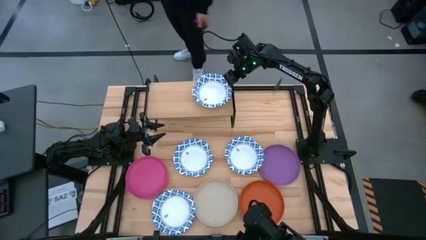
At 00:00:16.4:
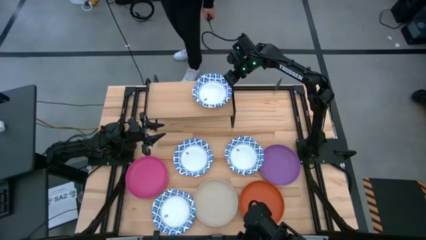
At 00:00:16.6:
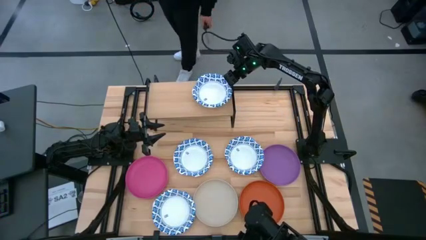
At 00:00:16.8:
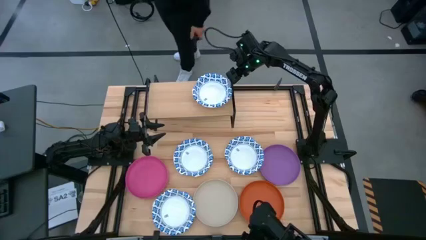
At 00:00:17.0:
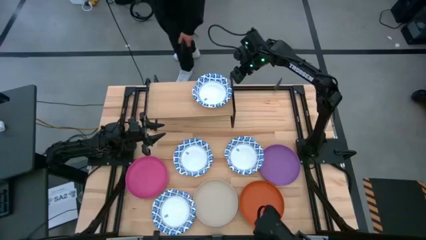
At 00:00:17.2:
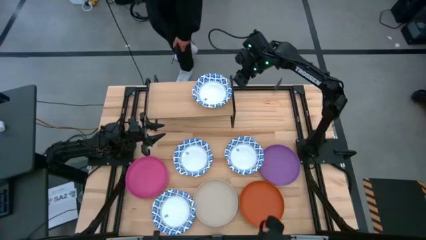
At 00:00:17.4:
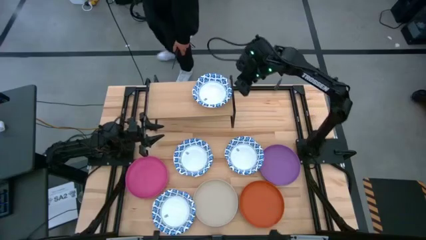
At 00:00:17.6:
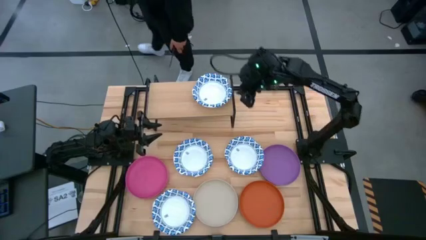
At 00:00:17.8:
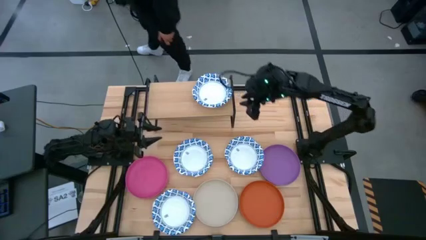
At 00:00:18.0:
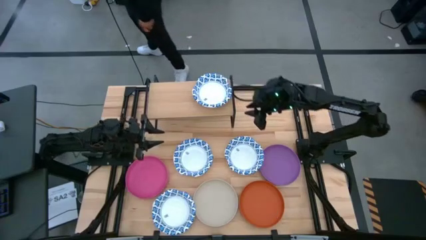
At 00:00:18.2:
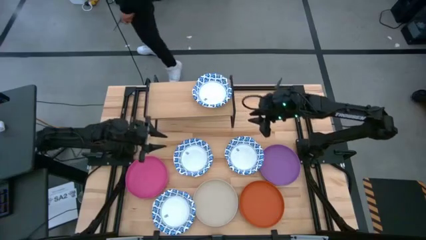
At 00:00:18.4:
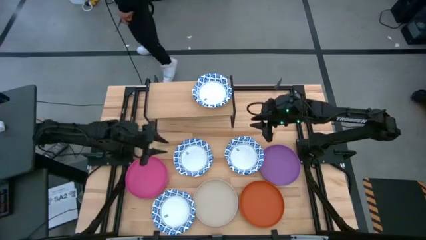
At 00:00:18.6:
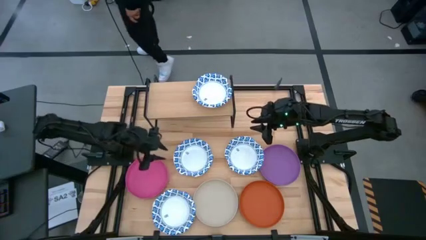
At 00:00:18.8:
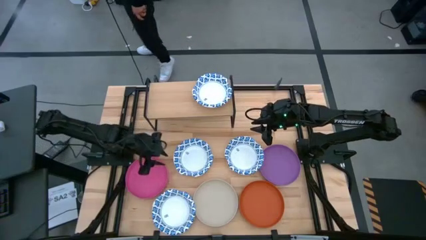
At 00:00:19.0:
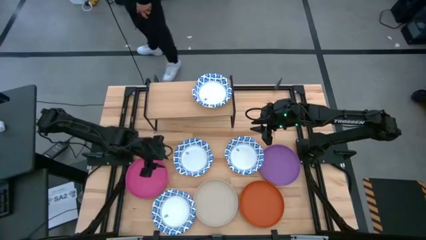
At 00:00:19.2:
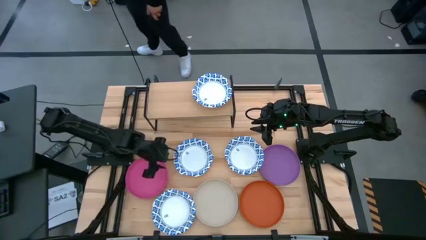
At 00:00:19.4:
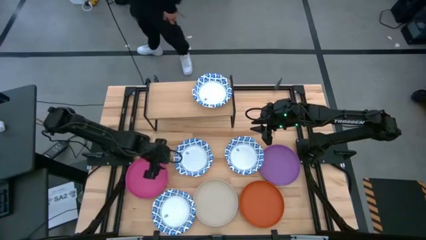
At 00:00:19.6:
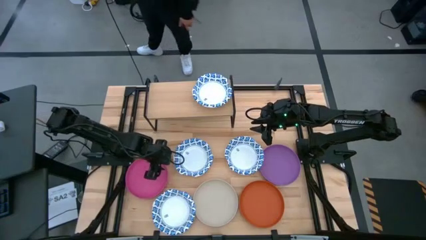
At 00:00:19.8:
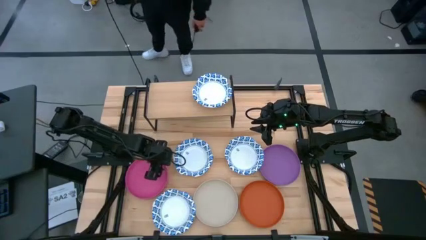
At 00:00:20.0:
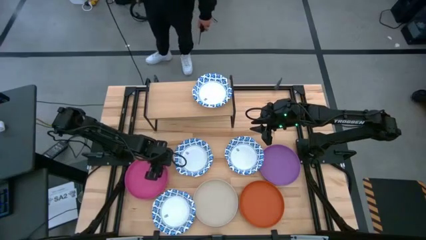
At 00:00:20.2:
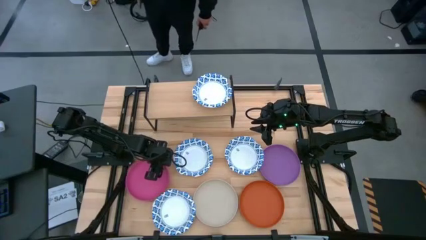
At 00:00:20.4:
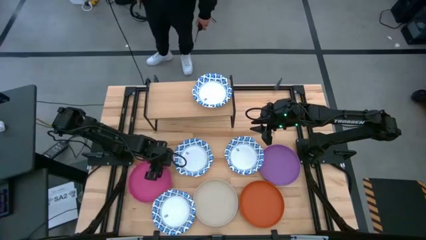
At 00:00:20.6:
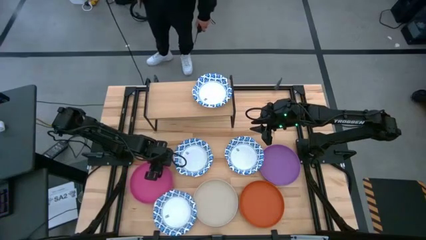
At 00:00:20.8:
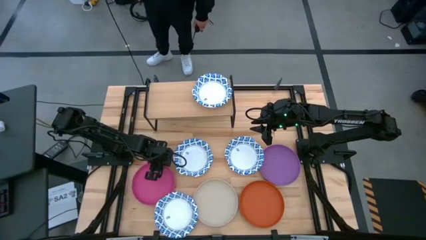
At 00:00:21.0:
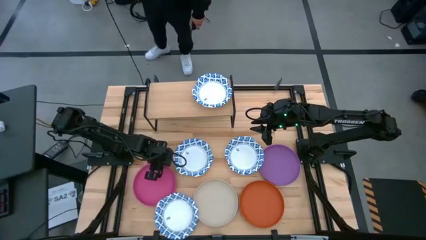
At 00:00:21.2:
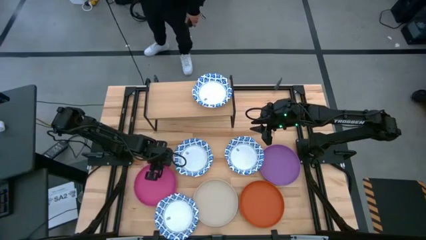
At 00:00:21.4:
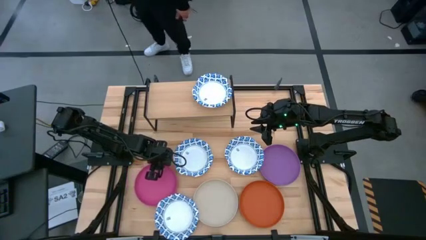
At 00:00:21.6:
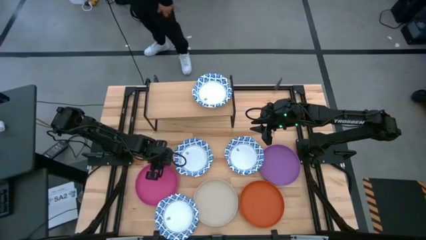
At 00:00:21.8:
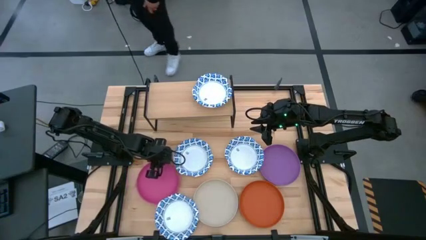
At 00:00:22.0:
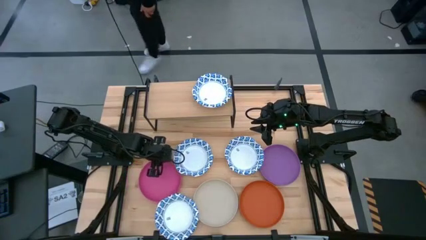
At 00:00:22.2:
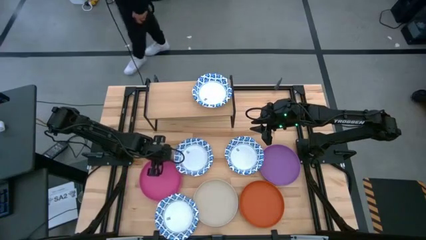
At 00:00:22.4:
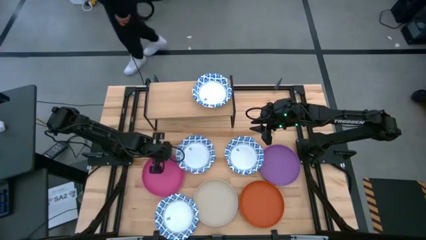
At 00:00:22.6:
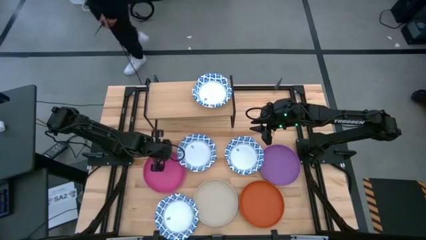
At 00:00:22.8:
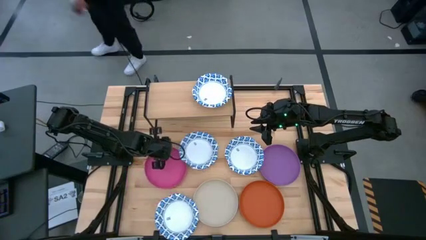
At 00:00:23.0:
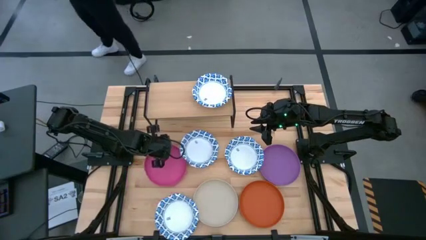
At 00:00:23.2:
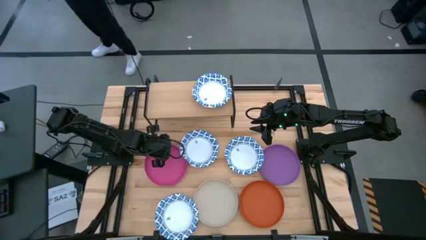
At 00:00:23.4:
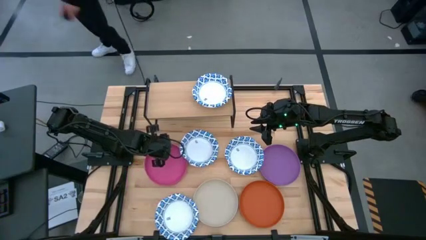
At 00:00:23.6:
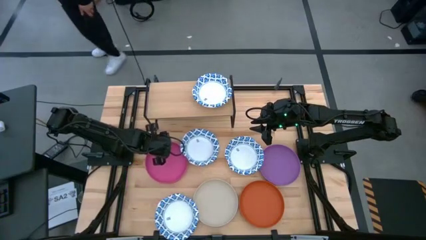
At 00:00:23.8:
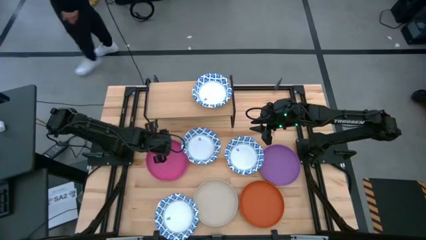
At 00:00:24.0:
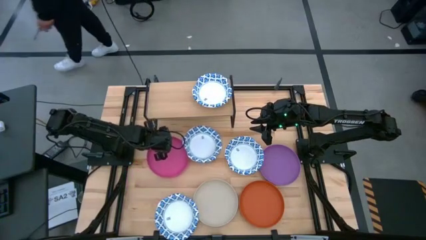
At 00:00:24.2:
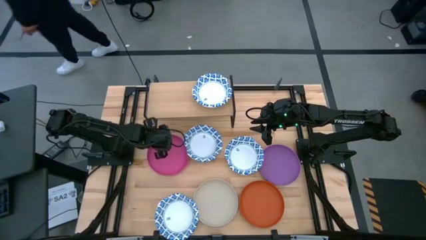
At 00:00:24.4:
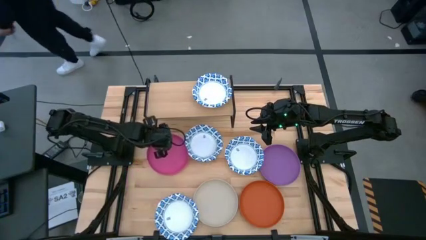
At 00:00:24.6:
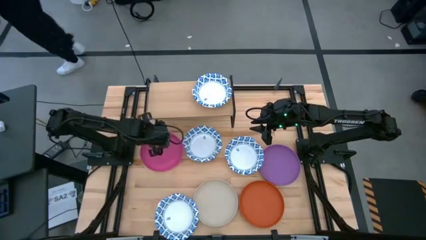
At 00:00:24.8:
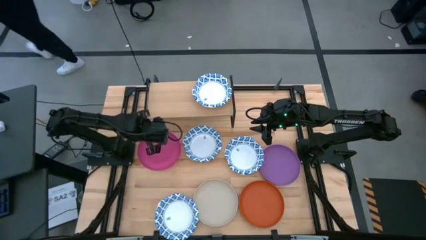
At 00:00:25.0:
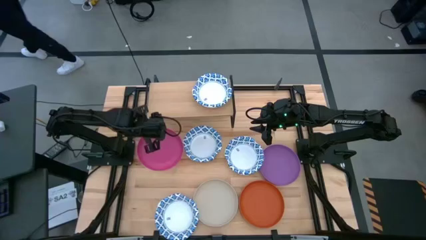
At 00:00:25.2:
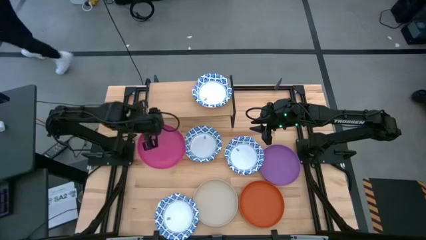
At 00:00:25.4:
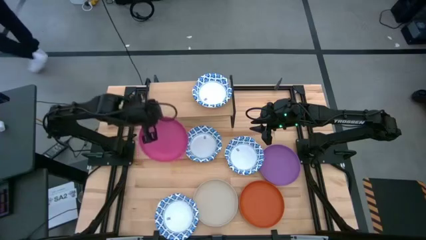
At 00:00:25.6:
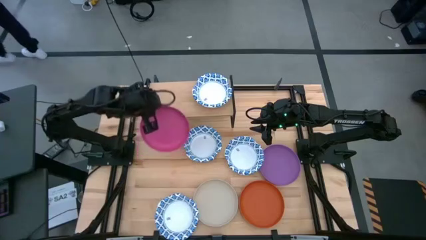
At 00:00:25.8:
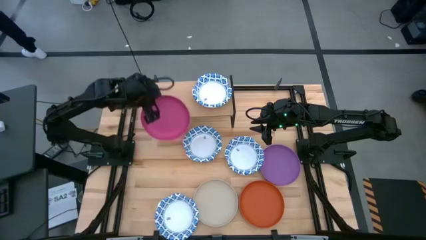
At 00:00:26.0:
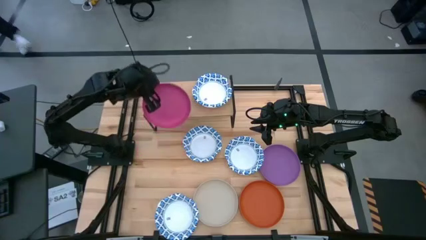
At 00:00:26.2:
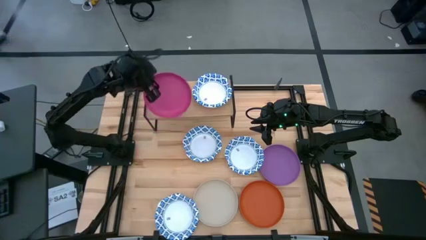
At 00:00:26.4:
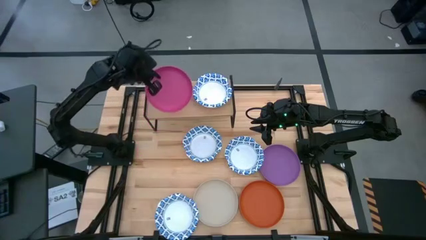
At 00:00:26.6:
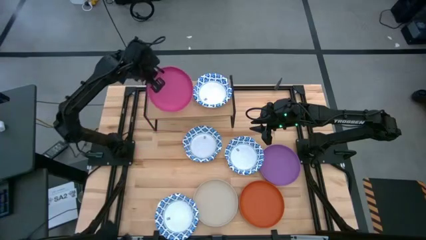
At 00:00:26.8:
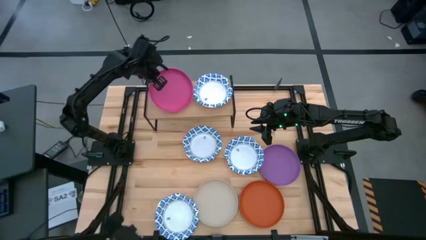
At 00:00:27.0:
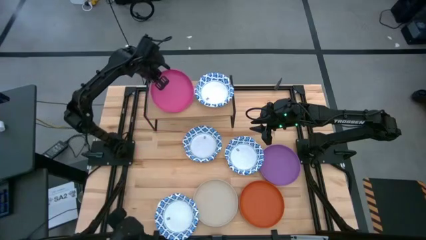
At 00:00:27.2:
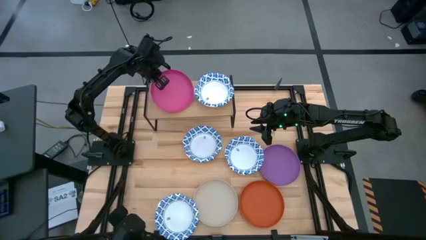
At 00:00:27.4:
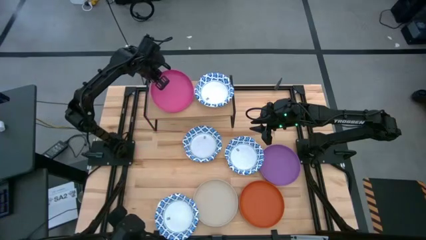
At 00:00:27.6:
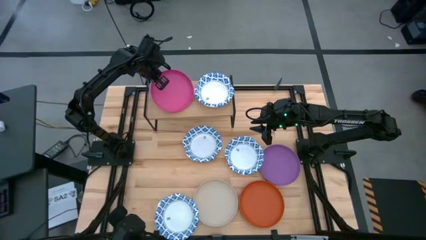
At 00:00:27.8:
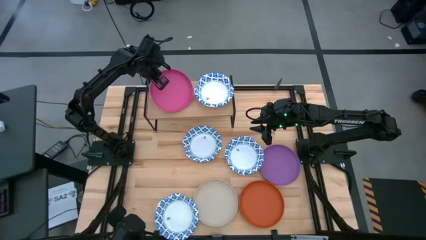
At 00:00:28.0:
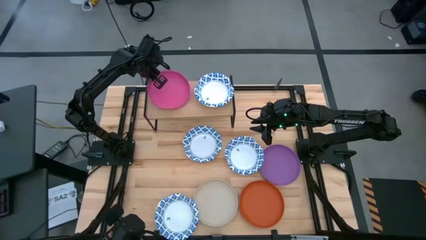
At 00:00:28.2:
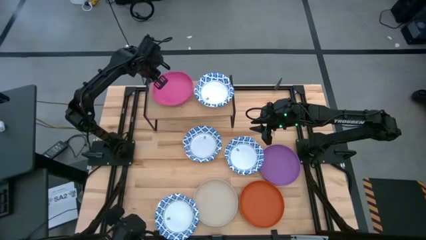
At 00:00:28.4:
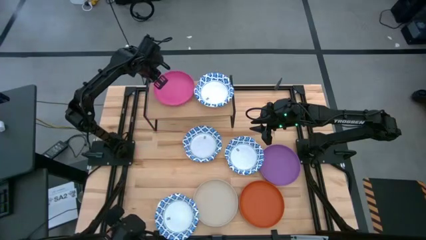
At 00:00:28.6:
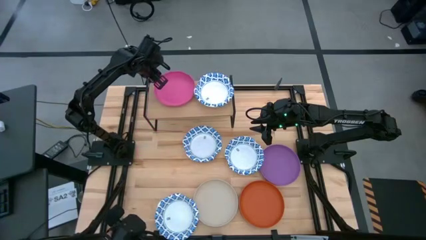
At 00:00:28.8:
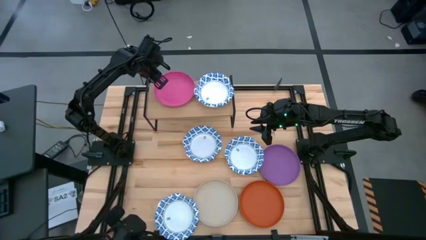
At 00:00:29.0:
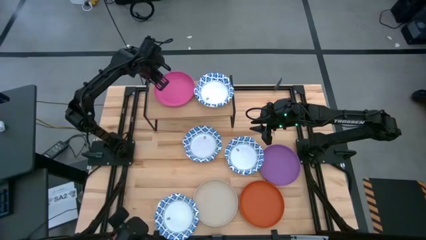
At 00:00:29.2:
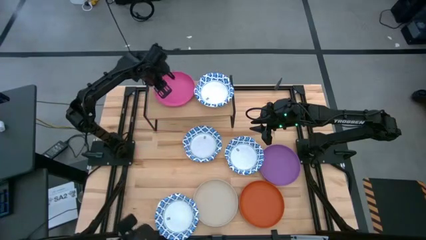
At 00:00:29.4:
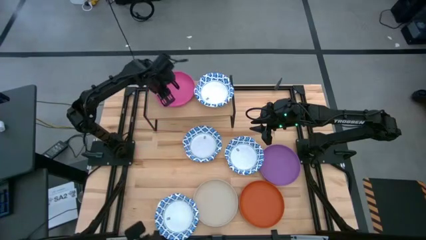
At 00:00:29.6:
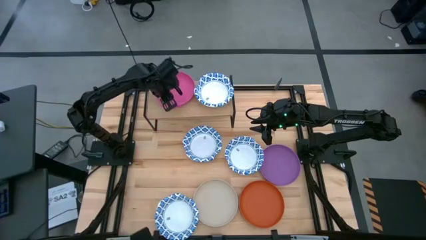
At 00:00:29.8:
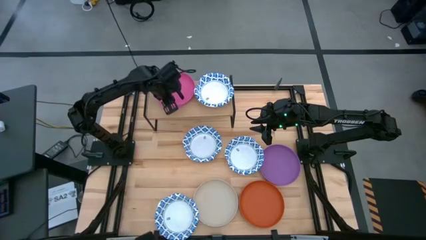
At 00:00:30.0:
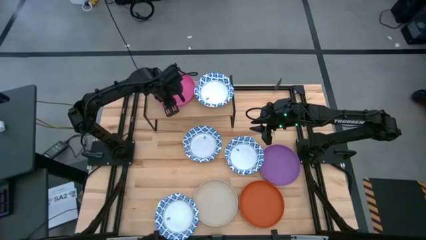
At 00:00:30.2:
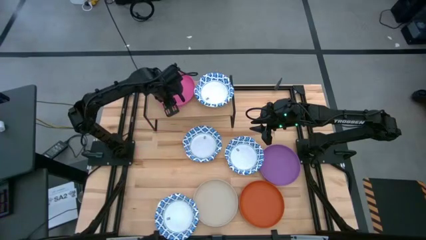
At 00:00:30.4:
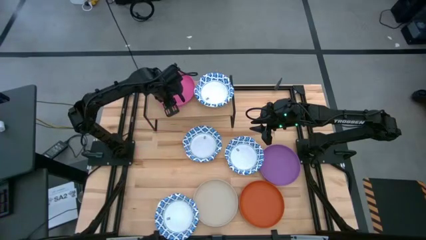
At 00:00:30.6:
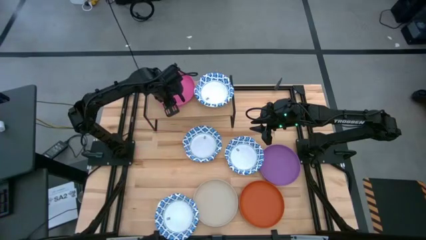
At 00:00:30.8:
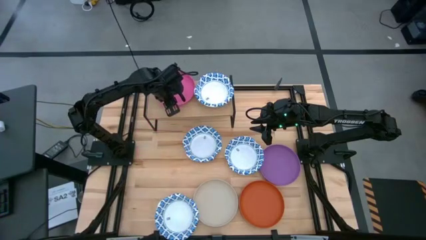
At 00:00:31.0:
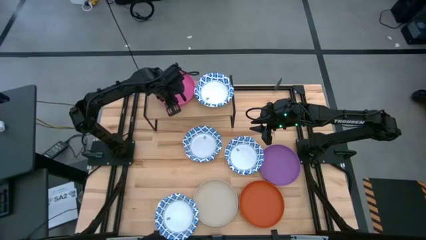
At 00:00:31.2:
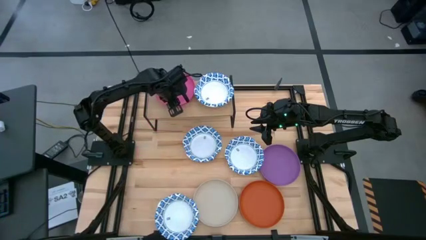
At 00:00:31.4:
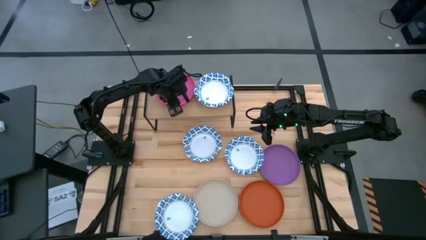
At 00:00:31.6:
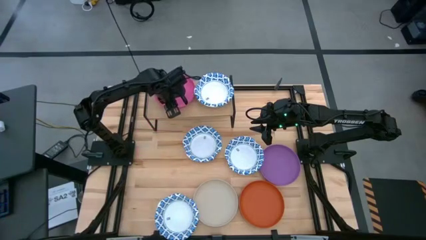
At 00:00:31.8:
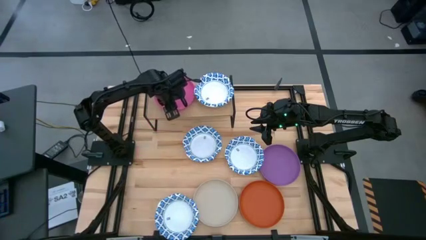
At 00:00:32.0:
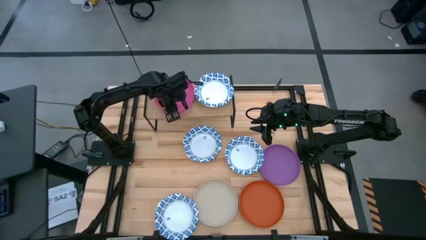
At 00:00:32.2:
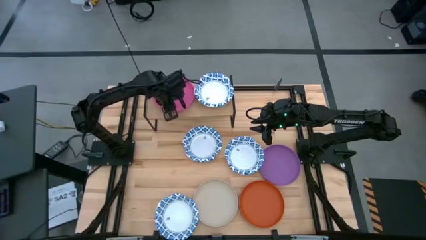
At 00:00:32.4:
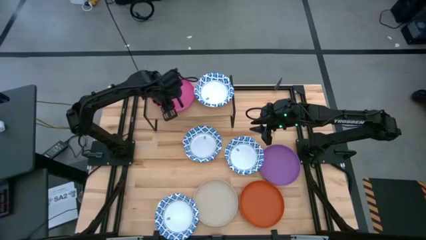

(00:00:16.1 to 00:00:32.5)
Task: Place and stack plates onto a shelf
Put the pink plate on the shelf
